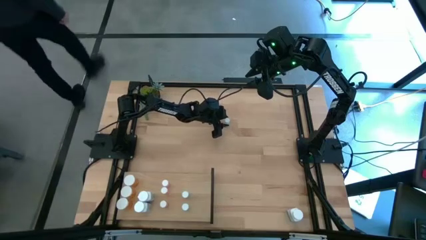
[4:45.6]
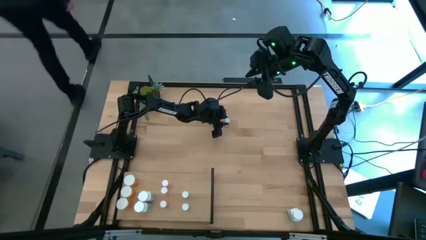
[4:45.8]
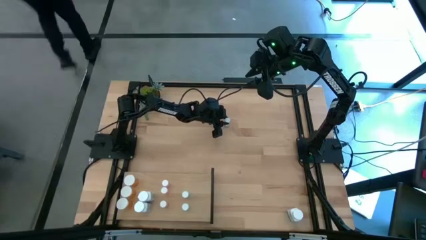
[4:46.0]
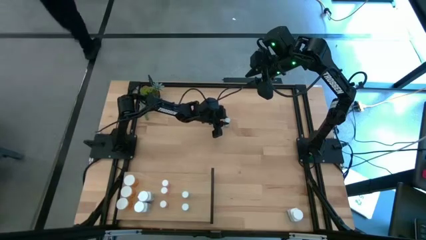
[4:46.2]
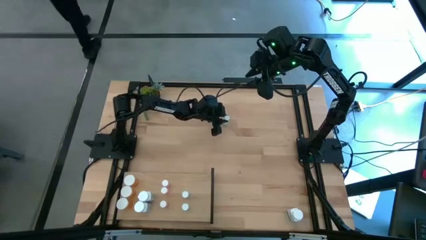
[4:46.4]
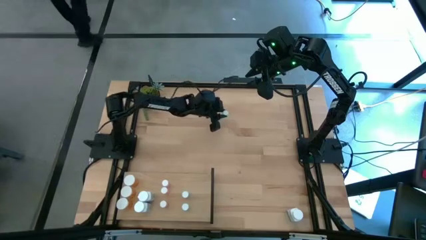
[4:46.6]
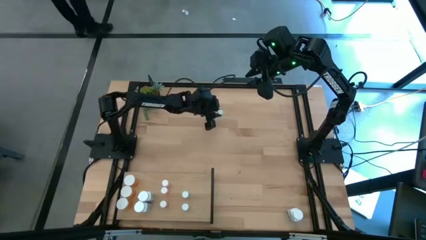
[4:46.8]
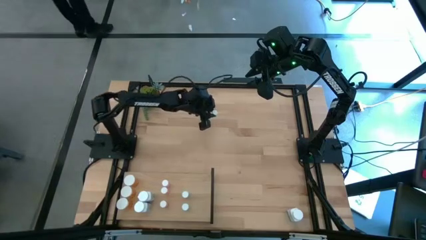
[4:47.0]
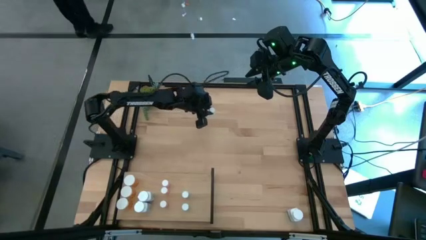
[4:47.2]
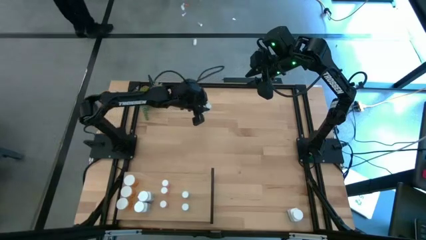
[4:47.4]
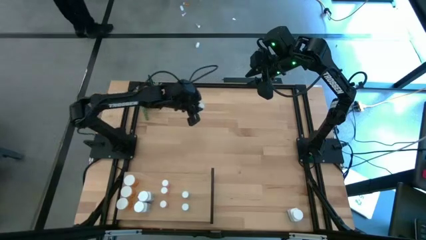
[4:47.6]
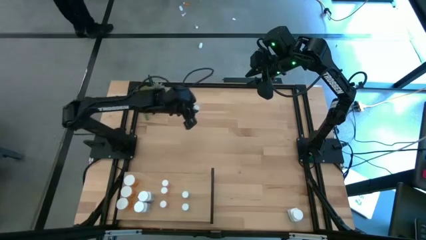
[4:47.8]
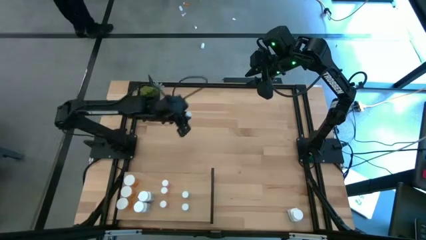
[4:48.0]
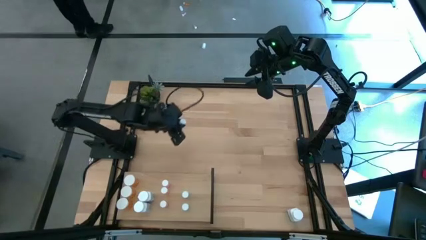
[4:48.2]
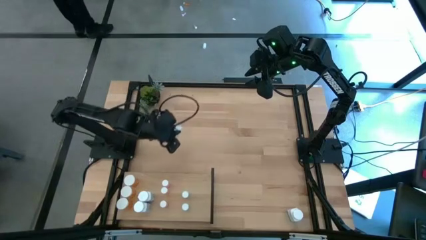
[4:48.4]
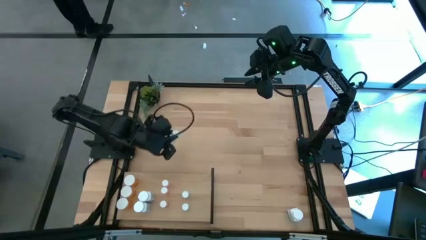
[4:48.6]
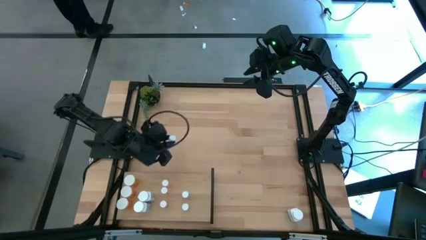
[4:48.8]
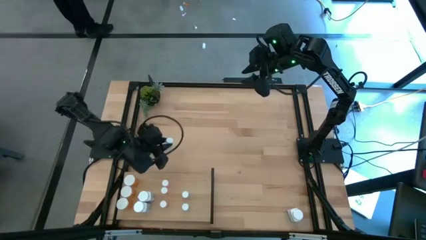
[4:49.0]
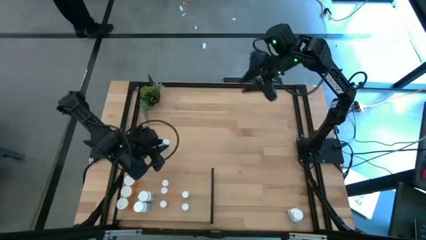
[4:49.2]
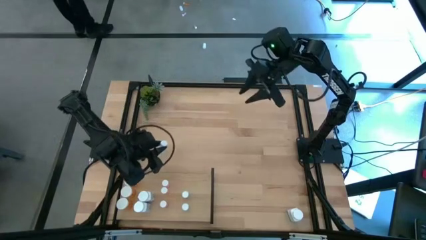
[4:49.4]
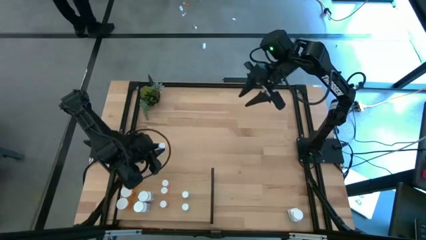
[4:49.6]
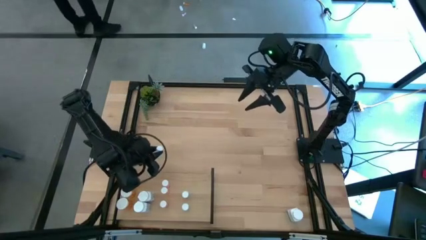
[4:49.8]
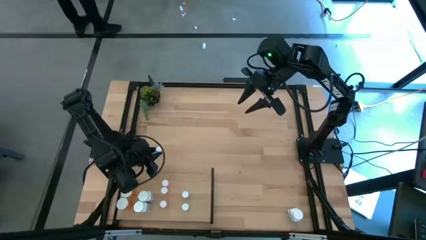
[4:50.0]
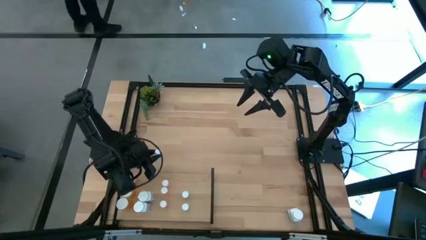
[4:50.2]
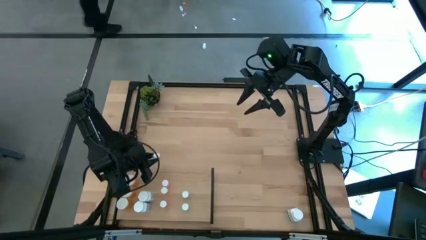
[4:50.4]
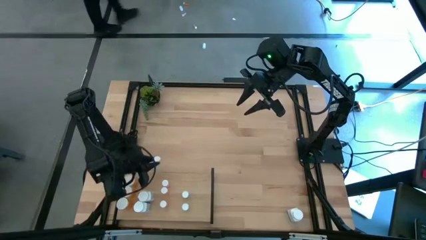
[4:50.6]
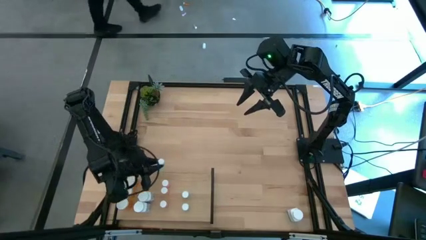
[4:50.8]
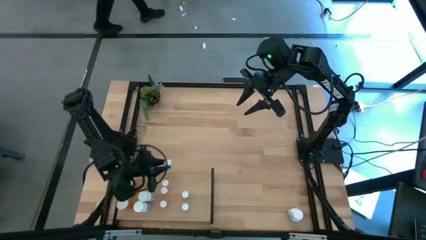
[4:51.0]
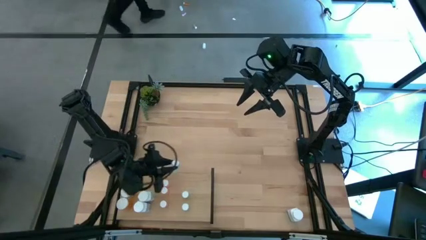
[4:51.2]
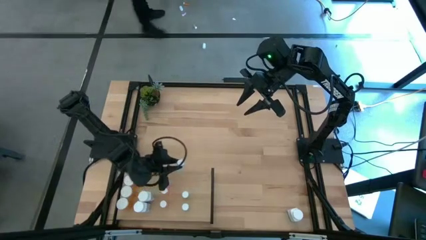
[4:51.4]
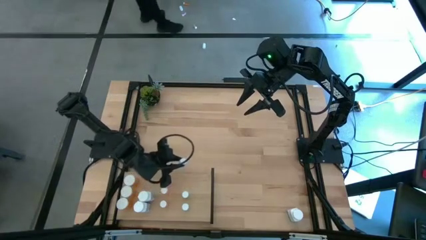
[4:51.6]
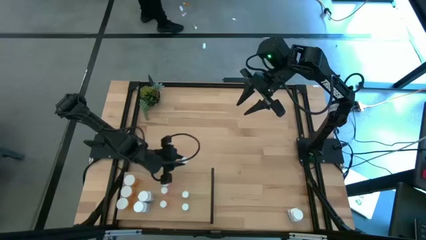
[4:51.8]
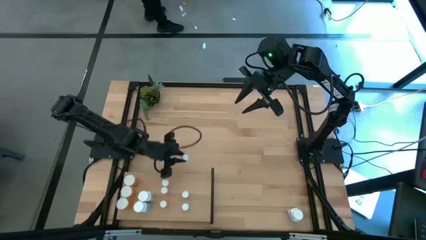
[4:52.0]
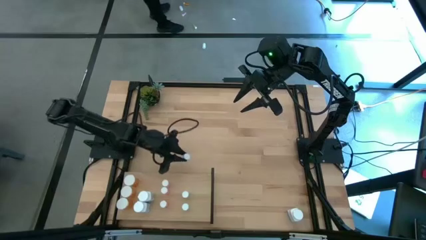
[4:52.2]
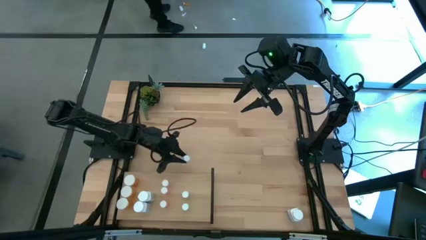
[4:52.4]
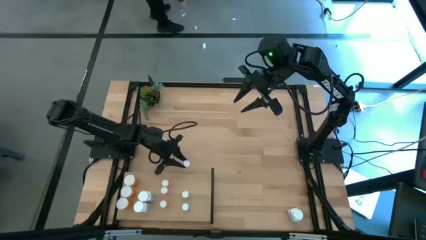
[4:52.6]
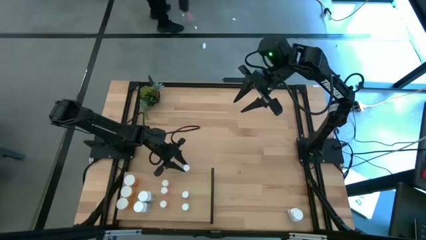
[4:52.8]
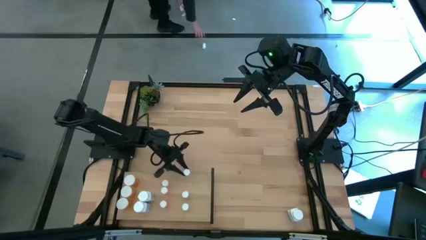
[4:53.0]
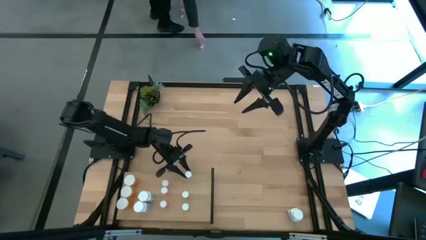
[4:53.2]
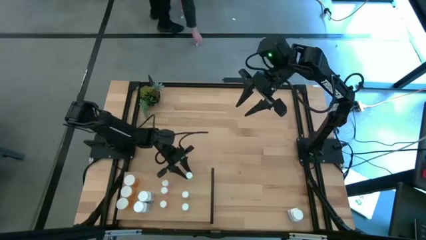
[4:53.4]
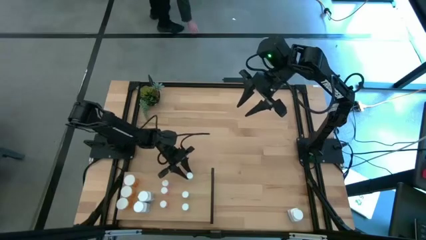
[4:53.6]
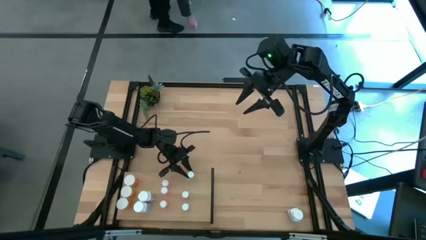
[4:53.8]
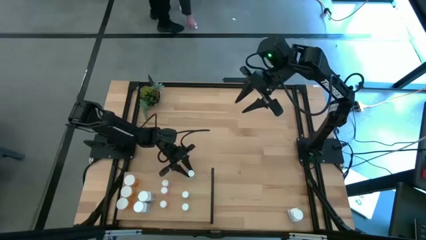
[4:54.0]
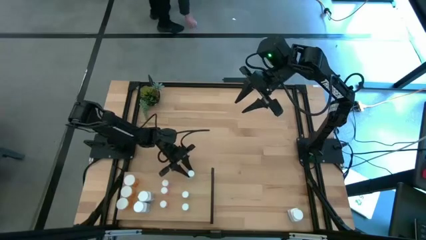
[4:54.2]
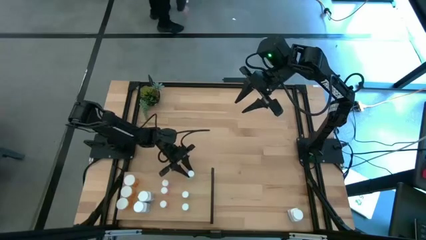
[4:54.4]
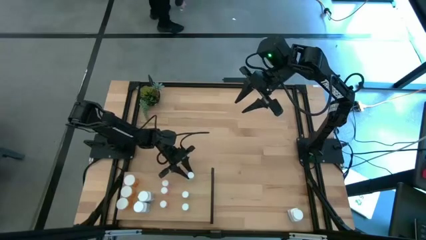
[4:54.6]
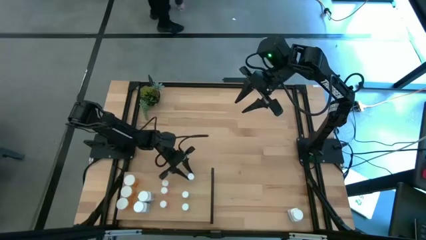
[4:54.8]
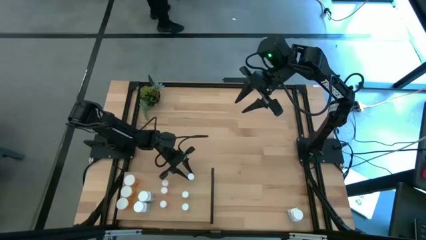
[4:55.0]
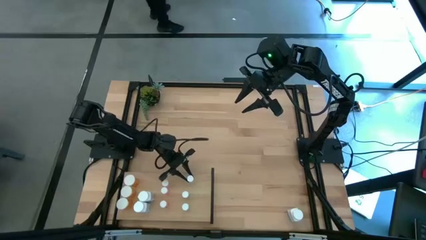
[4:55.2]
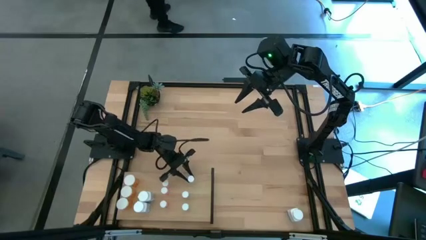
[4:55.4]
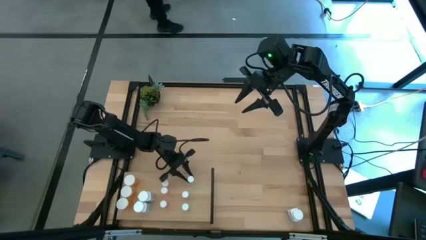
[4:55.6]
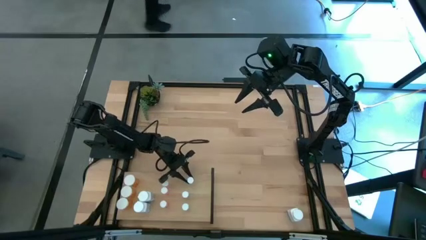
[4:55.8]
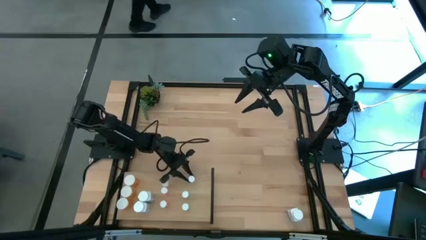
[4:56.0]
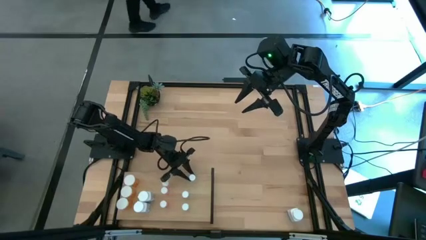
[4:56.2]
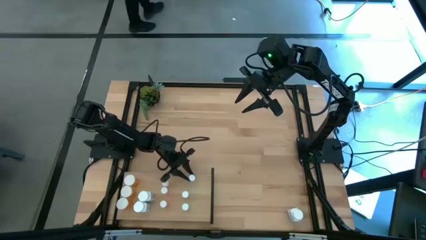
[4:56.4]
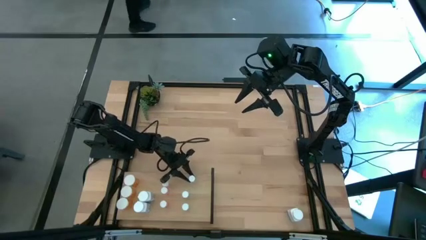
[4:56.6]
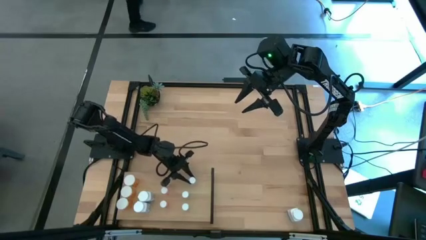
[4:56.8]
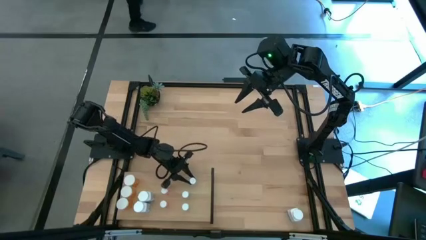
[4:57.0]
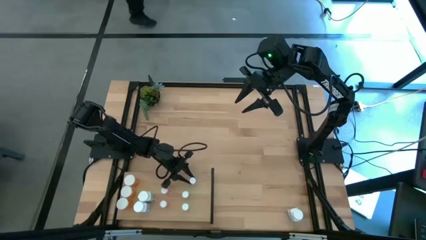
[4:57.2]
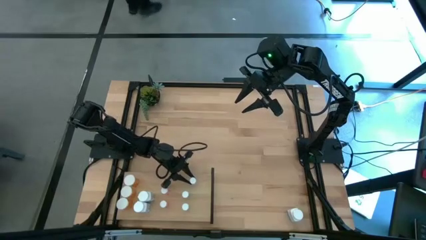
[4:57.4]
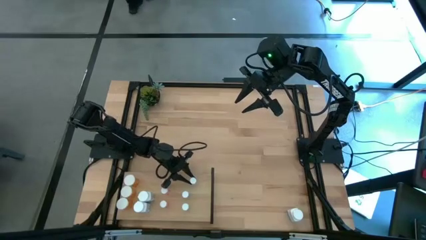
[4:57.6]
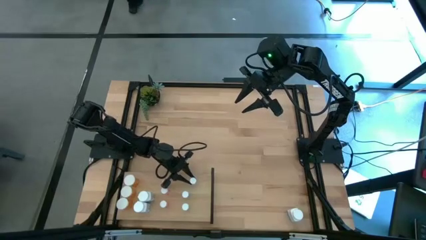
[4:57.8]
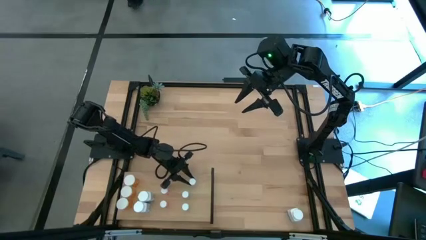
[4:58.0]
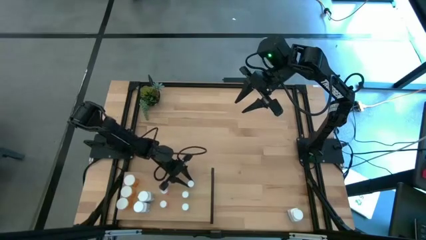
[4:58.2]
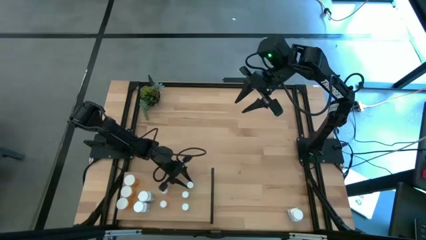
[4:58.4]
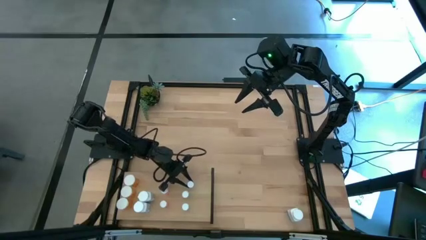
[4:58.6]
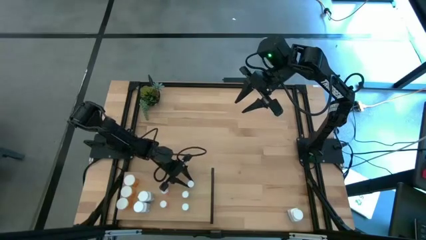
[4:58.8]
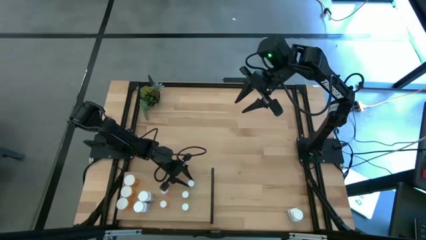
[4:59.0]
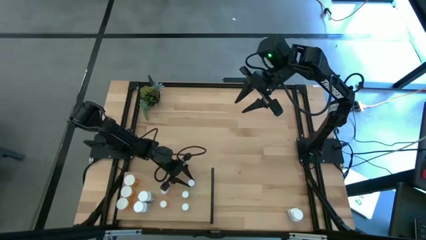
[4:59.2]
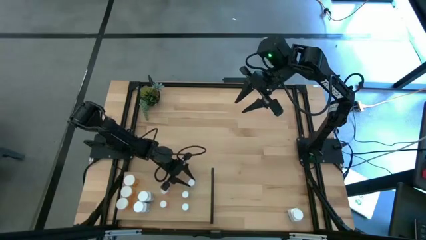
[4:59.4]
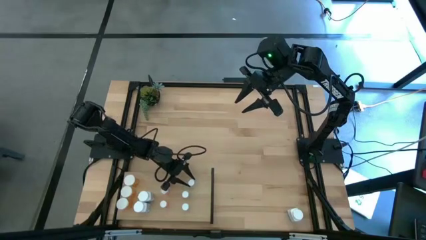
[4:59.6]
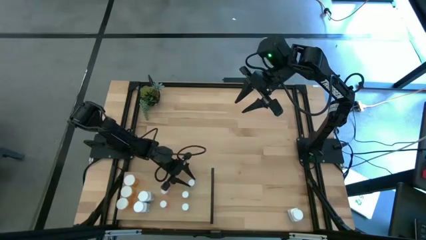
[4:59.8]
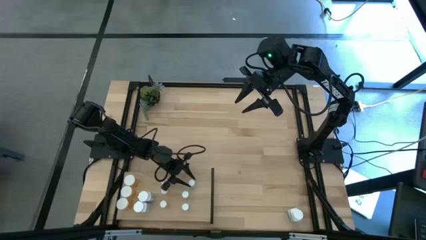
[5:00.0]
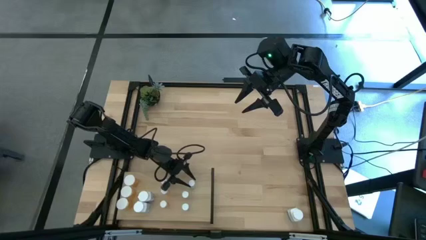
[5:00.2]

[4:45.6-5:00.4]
Task: Pick and place medicine bottles onto shelf by color
Put the small blue pill bottle on the shelf aligned with the other small blue pill bottles
